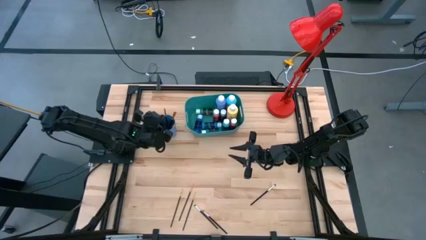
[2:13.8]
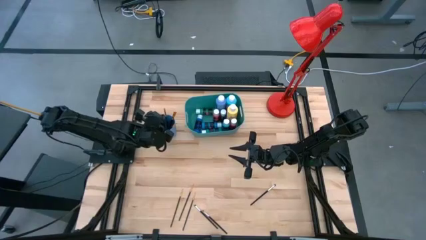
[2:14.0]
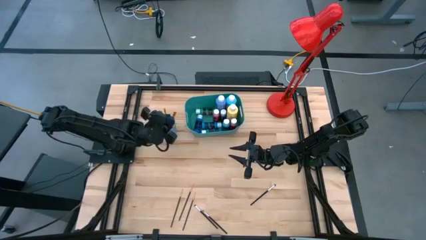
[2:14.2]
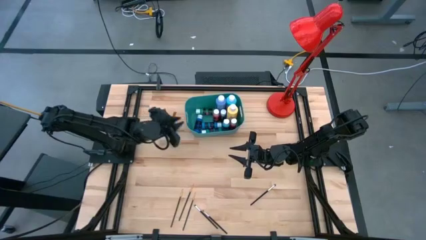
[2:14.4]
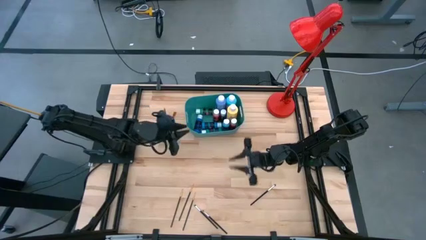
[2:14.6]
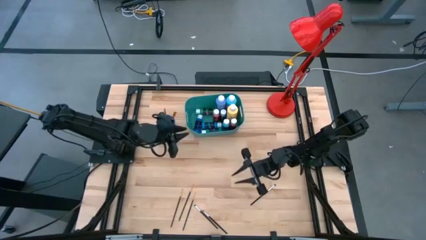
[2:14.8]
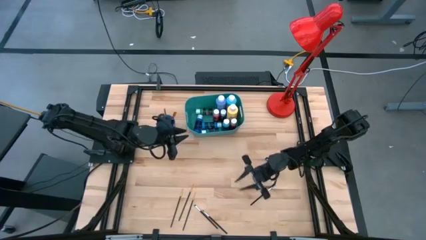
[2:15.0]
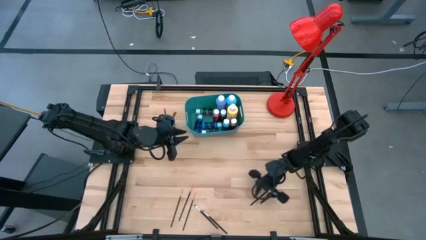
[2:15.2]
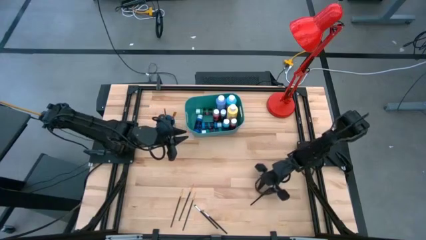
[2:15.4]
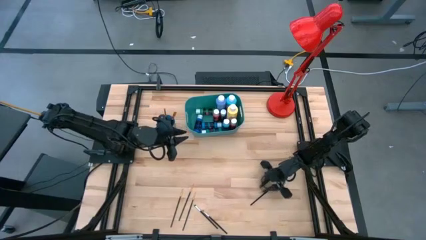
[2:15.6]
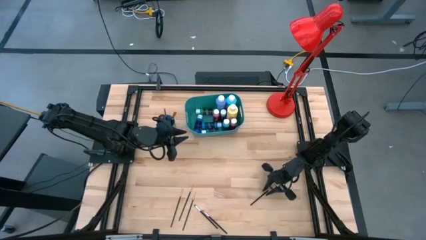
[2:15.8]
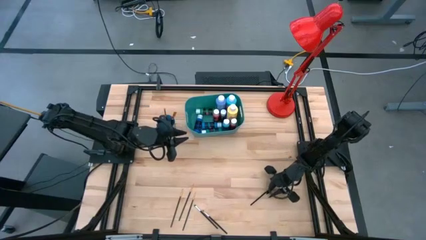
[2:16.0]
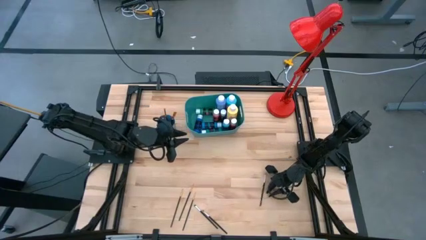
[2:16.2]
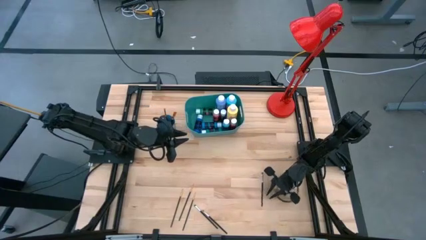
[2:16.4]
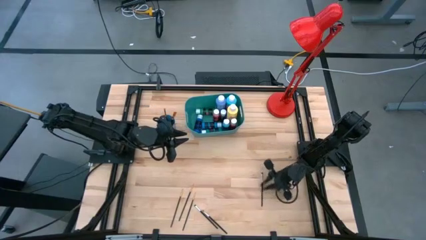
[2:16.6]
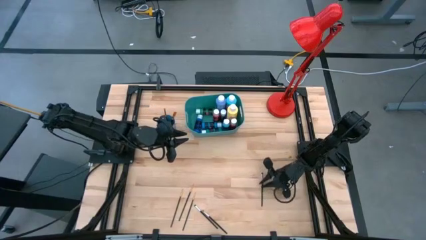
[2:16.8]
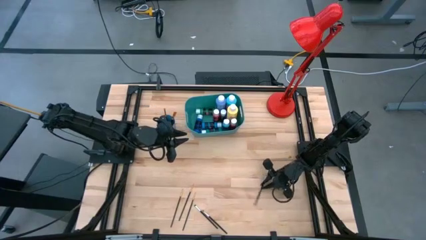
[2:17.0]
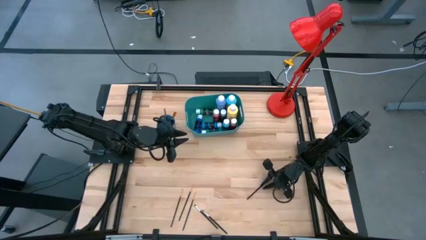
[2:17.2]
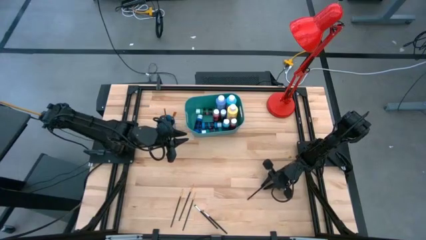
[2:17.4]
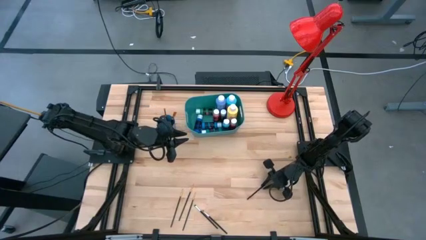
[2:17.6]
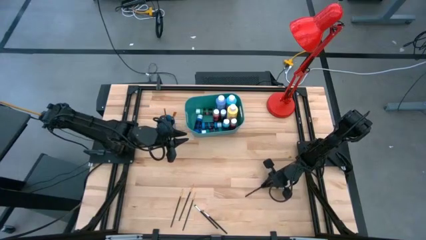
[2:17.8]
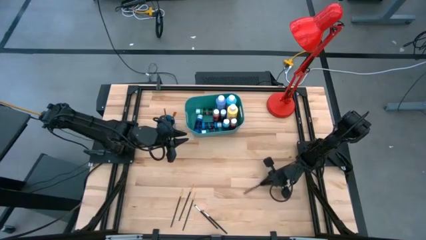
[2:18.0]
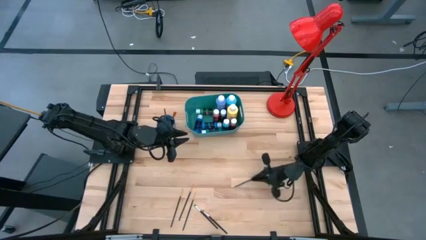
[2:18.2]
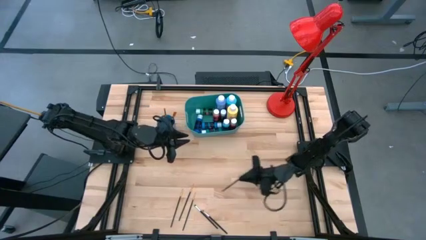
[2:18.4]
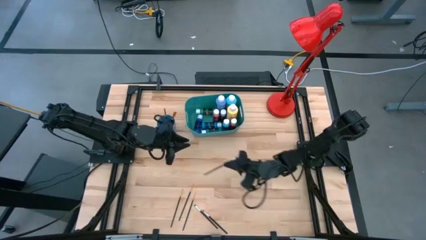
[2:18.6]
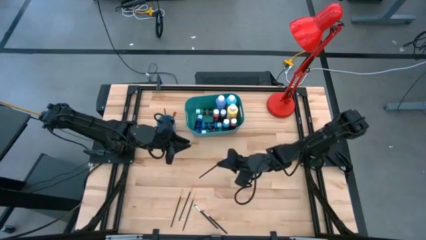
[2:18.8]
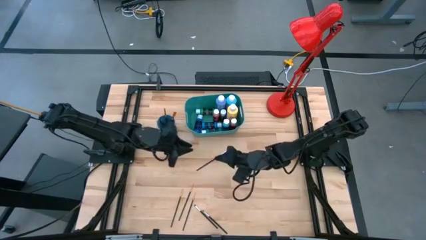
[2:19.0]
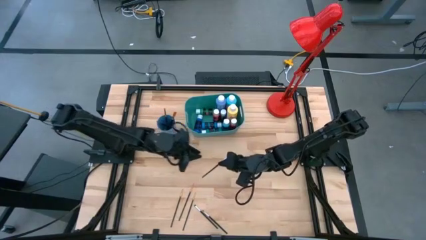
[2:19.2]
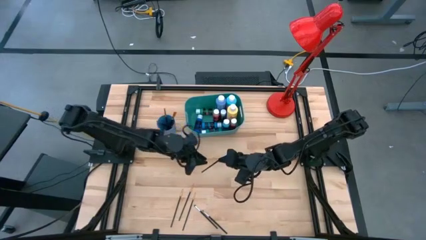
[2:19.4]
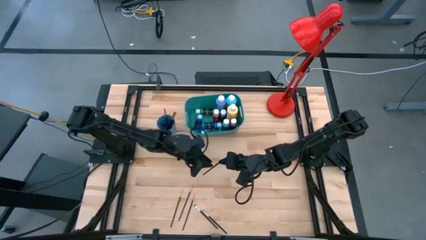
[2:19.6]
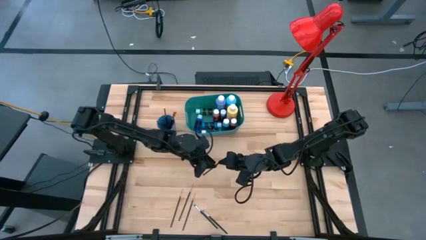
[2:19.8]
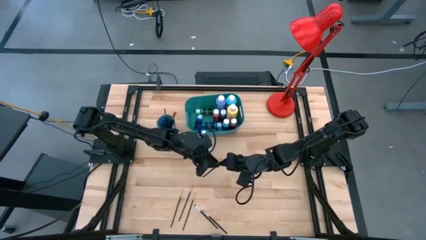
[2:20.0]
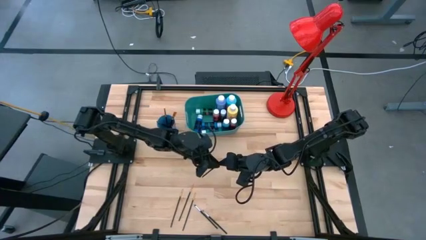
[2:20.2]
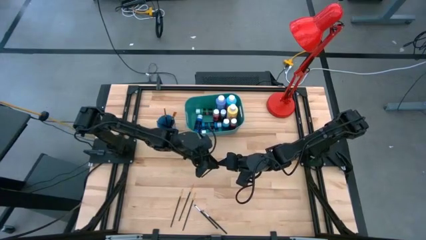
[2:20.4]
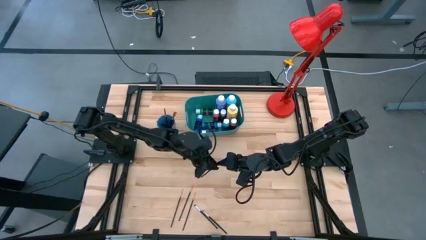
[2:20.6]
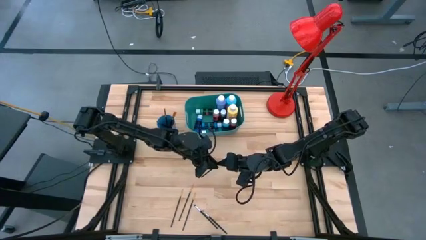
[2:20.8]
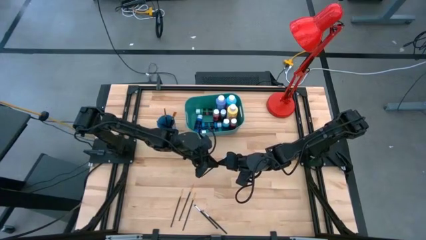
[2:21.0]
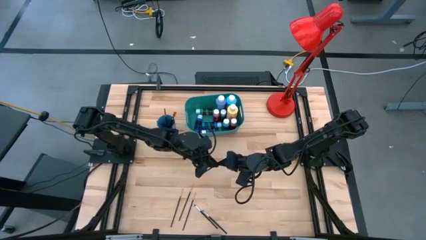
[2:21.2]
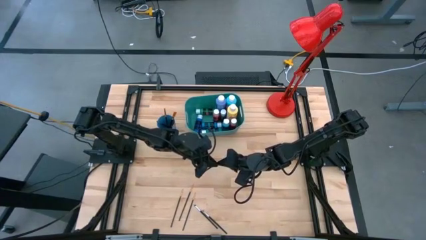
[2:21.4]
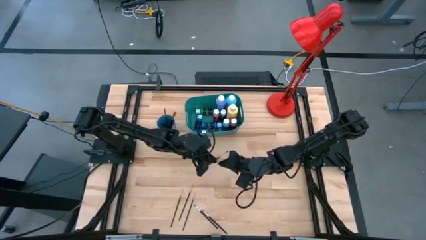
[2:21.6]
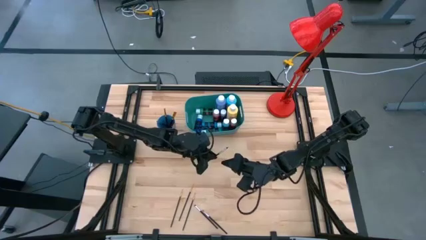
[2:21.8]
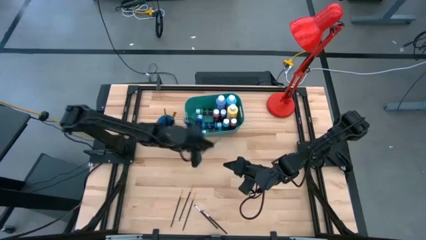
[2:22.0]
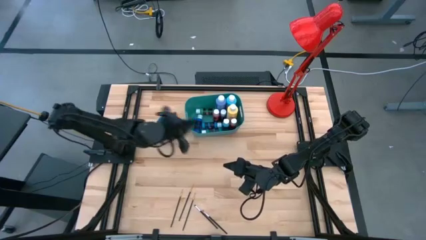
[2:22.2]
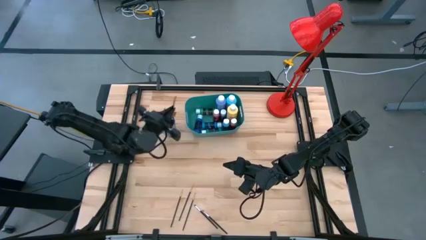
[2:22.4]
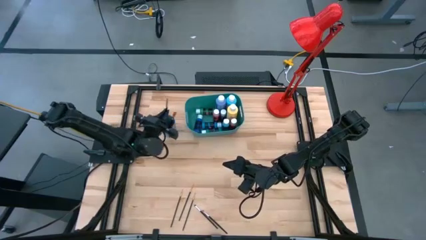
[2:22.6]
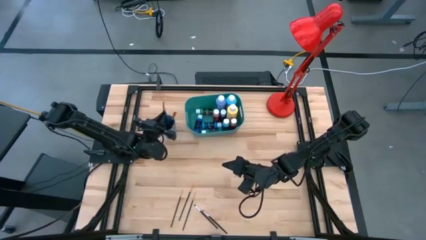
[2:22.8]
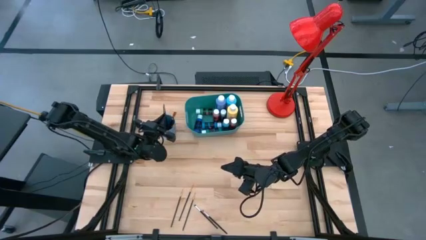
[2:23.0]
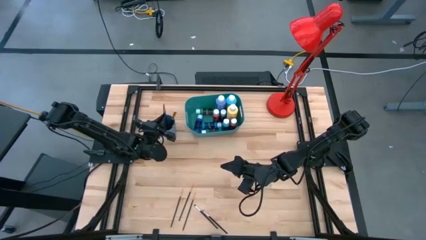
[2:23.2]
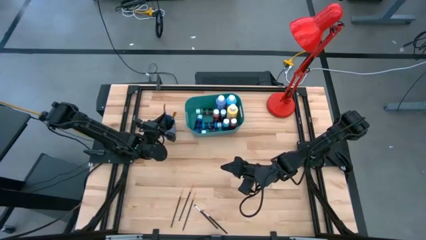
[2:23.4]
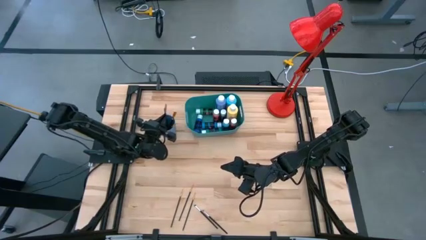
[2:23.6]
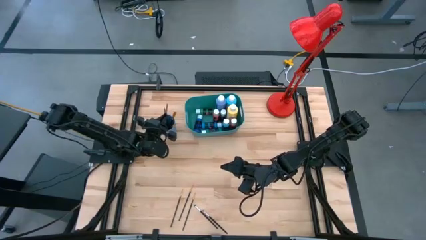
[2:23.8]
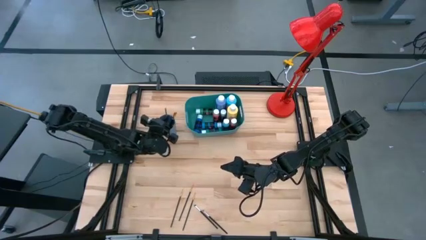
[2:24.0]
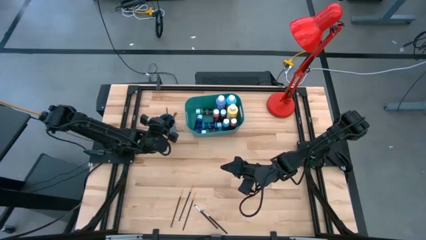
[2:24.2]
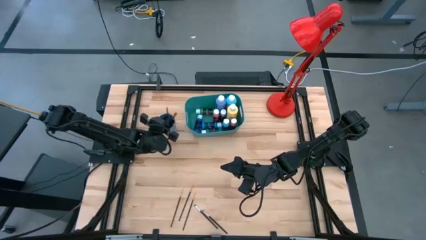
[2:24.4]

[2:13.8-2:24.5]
Task: Pick & Place Paint Supplies
Put the silver paint brush into the blue cup

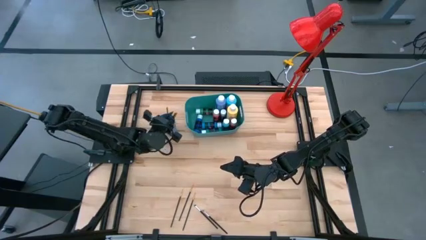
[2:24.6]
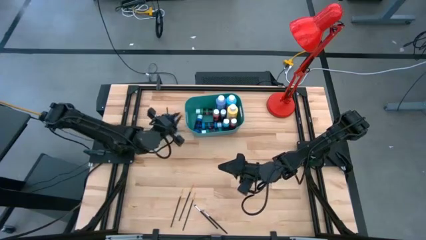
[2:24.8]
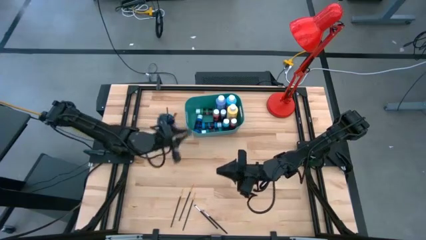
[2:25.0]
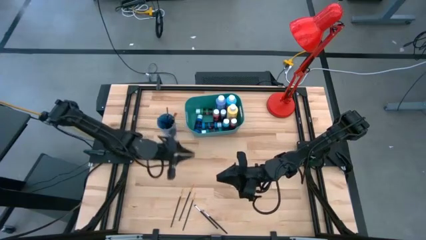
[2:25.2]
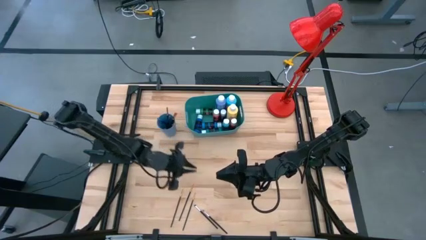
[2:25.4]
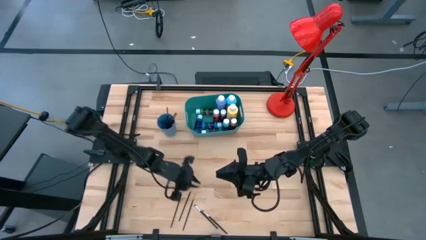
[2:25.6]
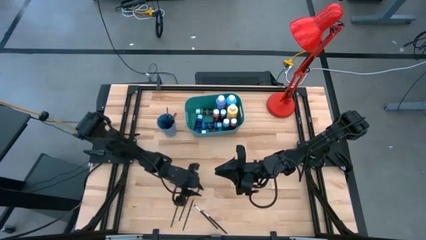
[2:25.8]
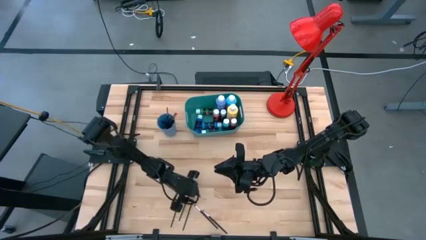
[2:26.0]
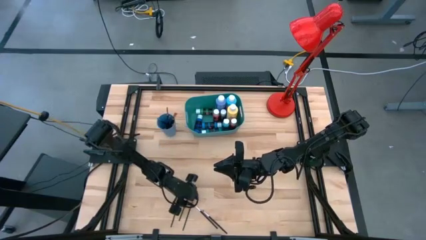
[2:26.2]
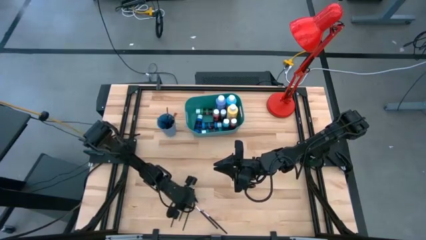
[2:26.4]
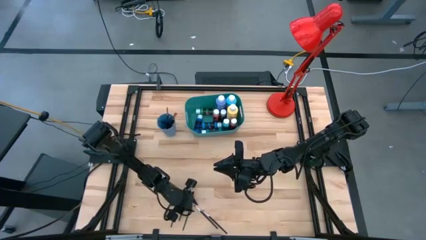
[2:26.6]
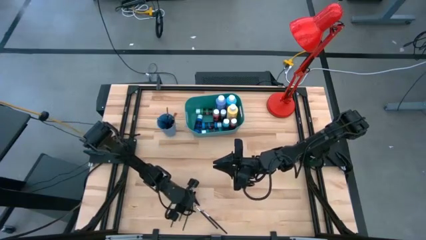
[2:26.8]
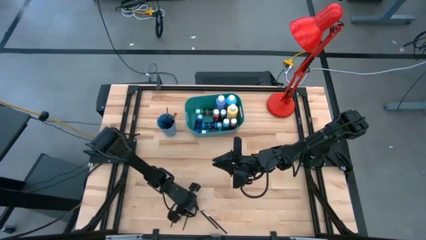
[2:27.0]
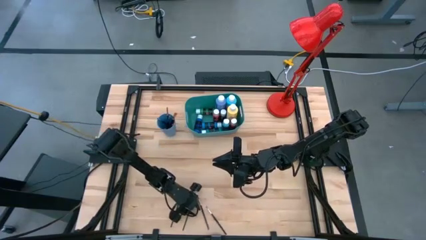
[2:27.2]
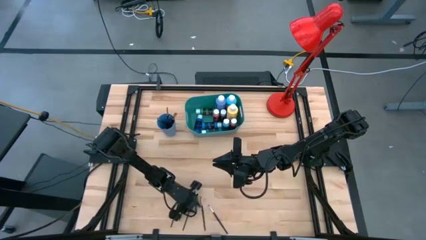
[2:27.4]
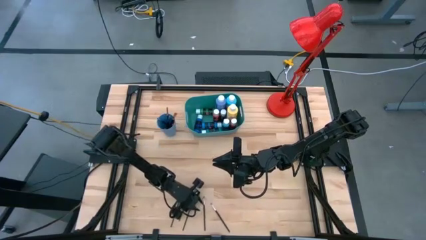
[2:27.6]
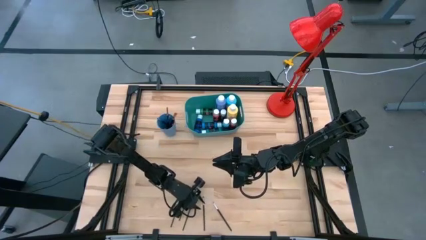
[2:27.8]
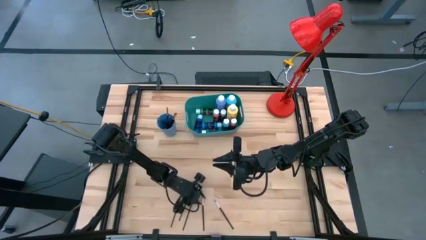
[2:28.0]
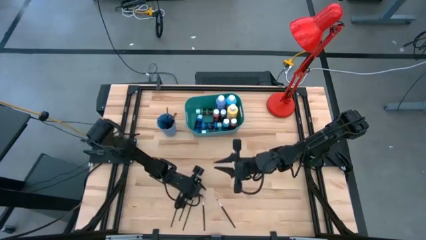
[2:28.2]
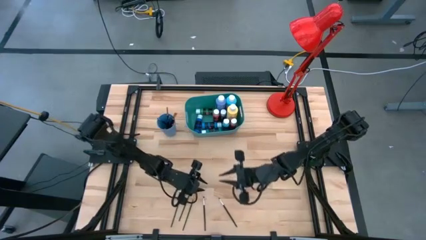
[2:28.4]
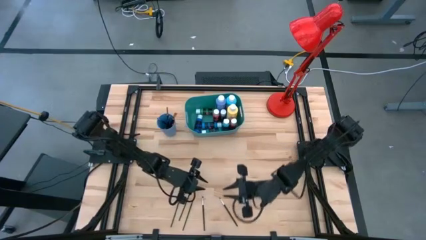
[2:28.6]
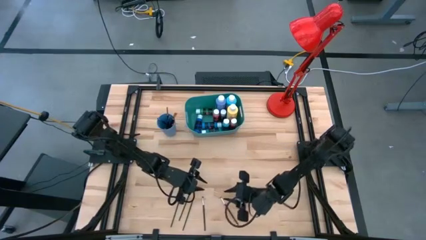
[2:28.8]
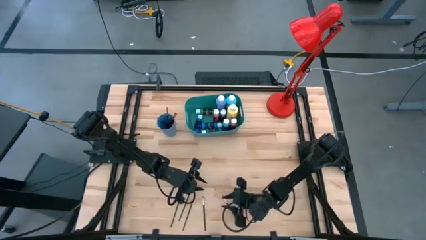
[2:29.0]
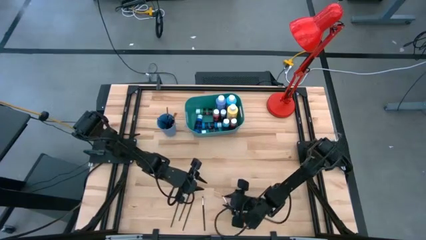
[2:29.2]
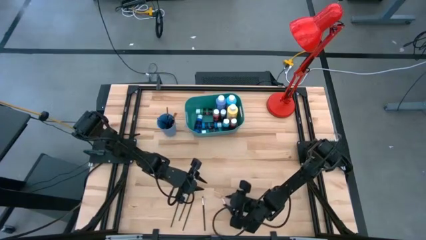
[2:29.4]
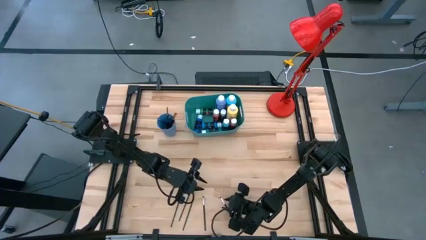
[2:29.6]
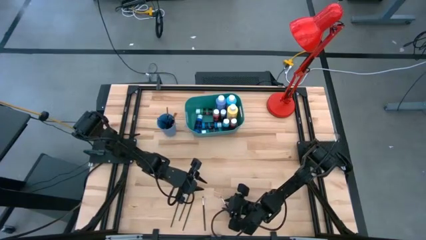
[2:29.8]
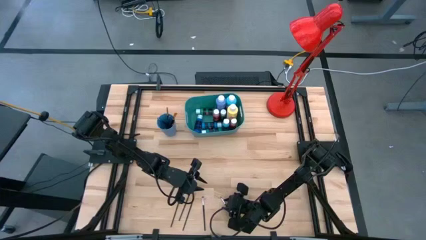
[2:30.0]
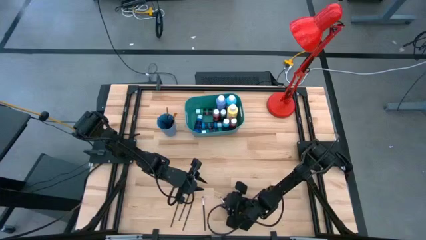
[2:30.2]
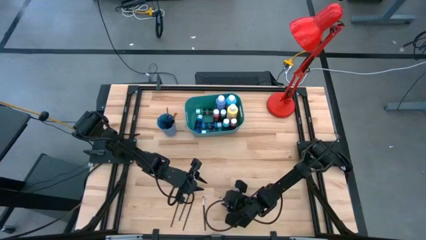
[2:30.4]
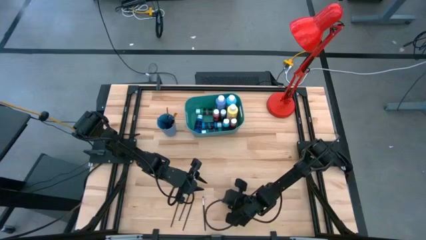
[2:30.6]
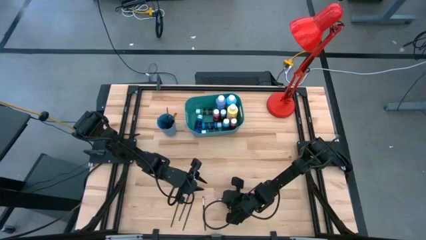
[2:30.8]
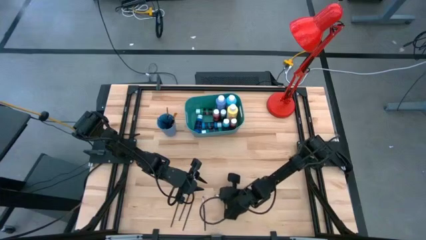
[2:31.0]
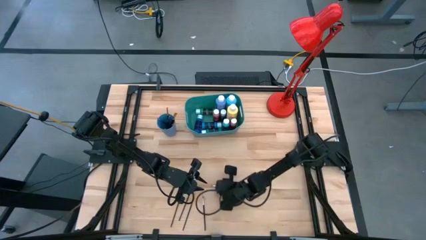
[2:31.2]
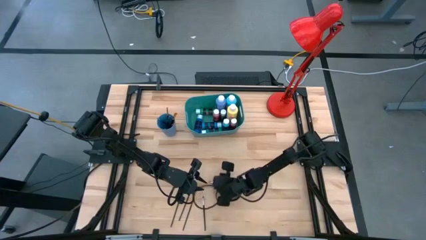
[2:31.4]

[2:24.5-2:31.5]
Put the silver paint brush into the blue cup
